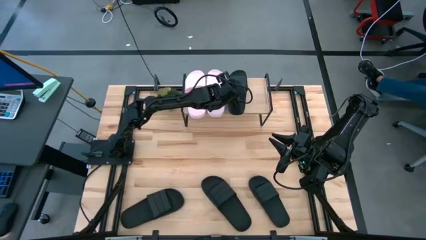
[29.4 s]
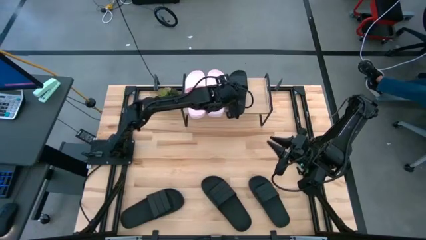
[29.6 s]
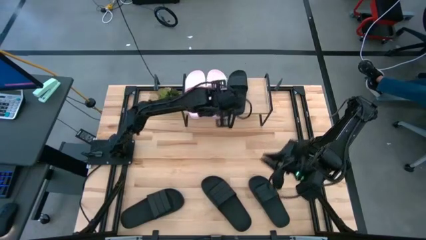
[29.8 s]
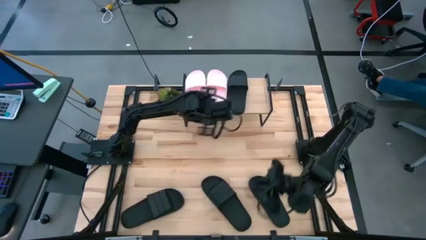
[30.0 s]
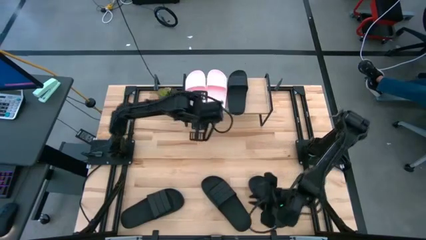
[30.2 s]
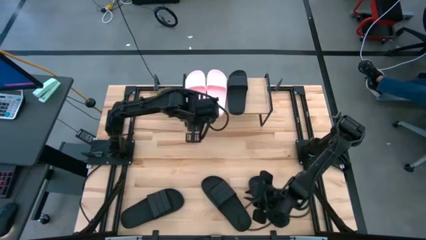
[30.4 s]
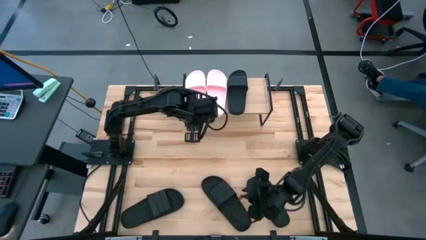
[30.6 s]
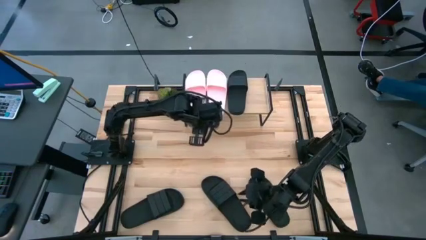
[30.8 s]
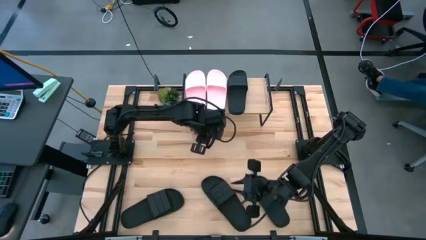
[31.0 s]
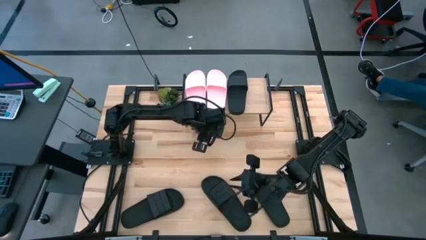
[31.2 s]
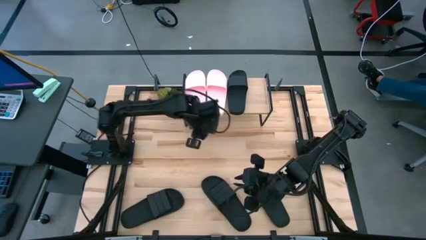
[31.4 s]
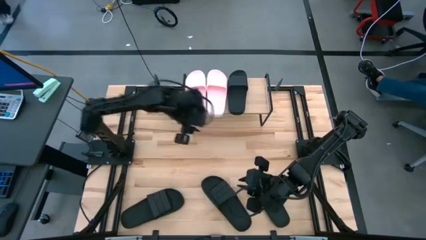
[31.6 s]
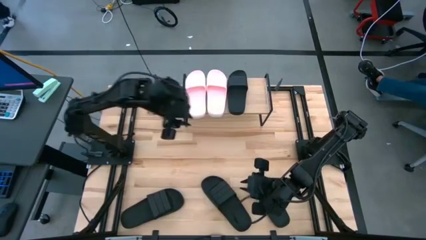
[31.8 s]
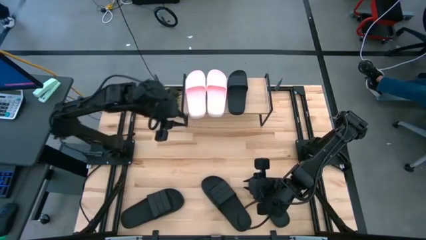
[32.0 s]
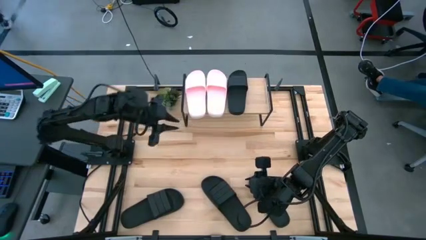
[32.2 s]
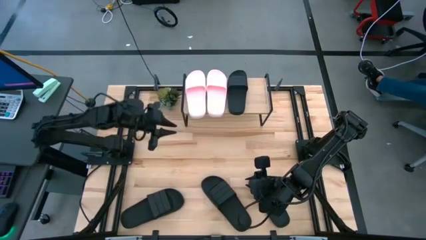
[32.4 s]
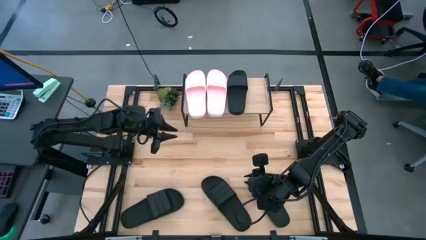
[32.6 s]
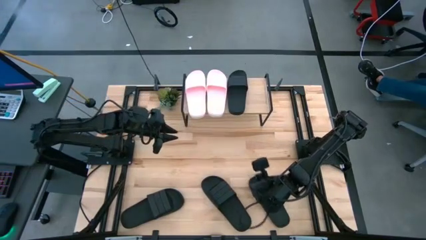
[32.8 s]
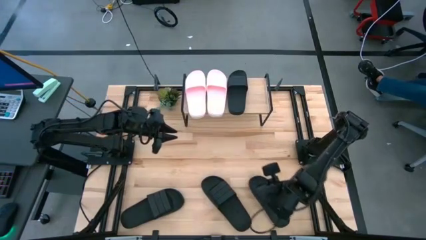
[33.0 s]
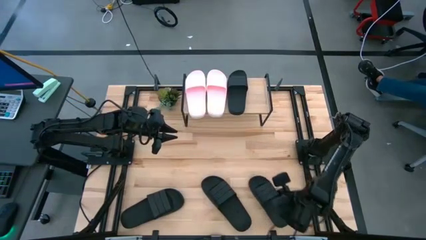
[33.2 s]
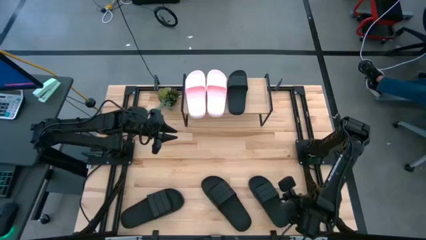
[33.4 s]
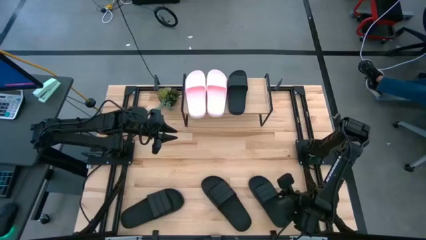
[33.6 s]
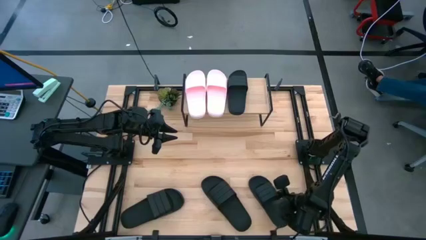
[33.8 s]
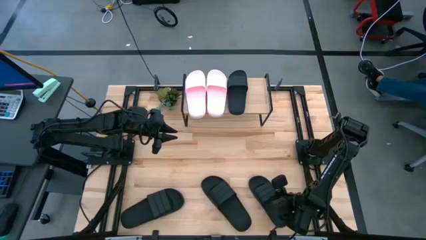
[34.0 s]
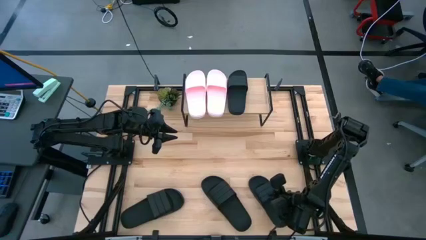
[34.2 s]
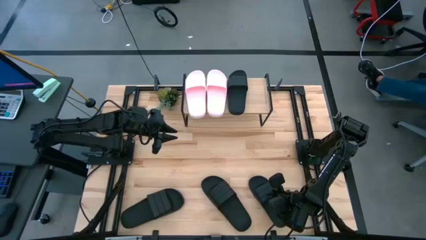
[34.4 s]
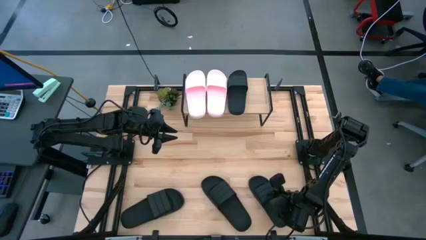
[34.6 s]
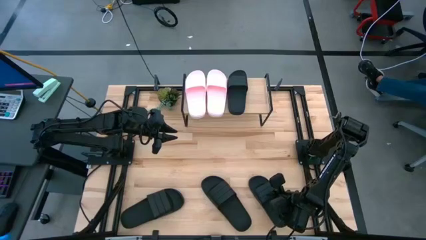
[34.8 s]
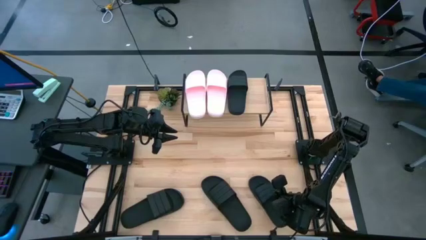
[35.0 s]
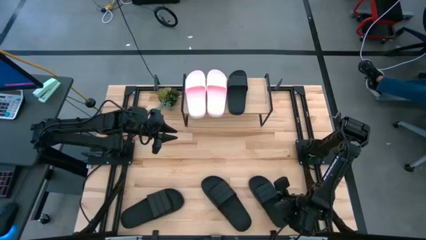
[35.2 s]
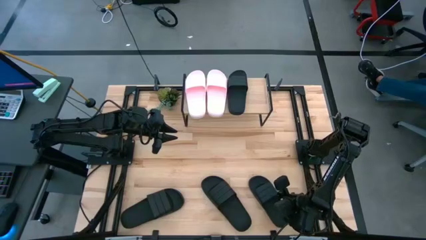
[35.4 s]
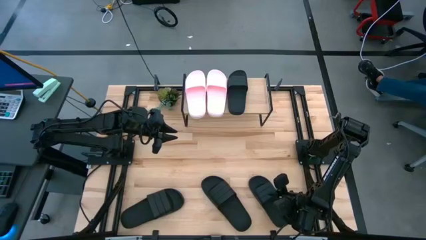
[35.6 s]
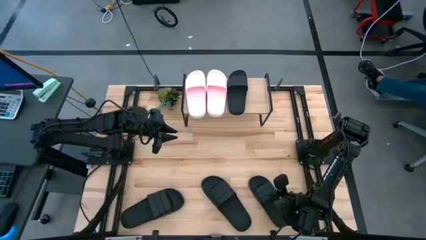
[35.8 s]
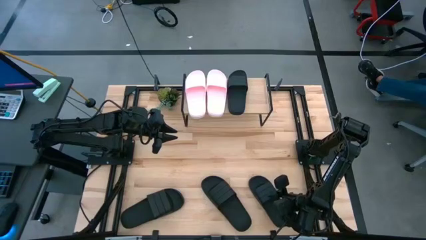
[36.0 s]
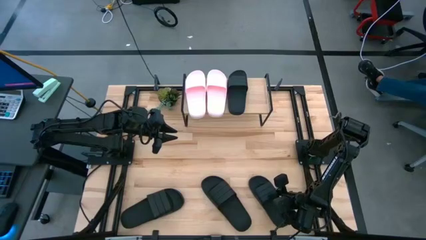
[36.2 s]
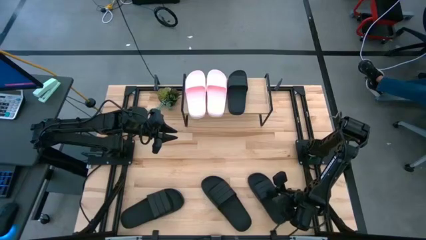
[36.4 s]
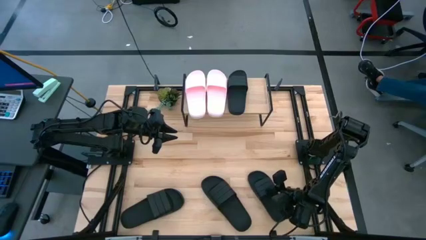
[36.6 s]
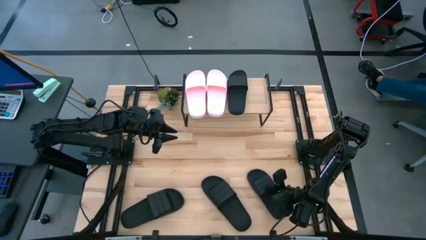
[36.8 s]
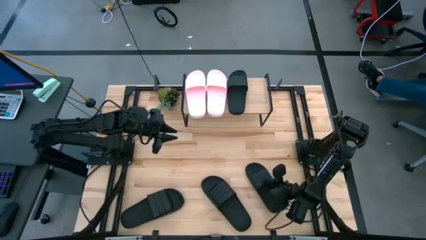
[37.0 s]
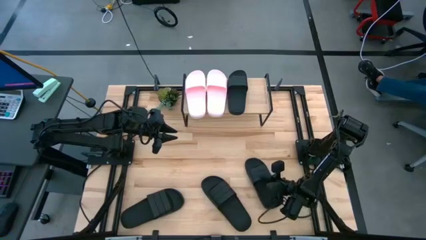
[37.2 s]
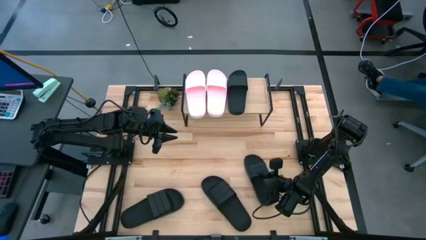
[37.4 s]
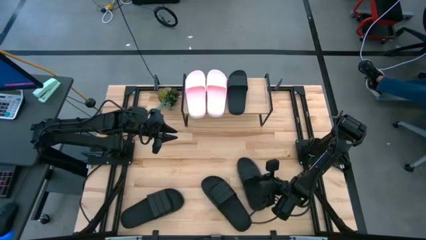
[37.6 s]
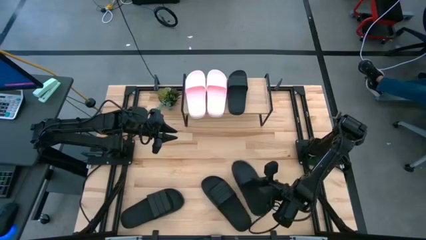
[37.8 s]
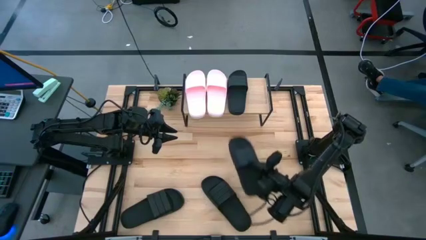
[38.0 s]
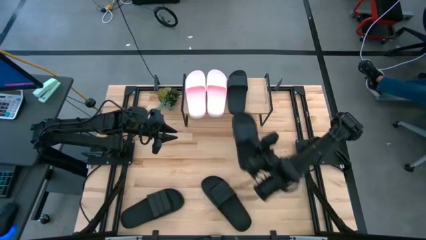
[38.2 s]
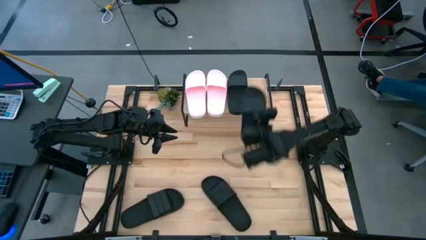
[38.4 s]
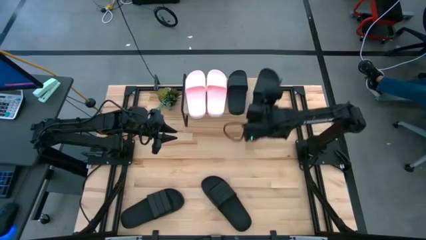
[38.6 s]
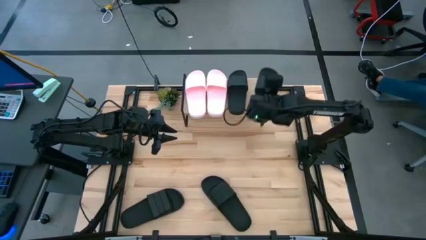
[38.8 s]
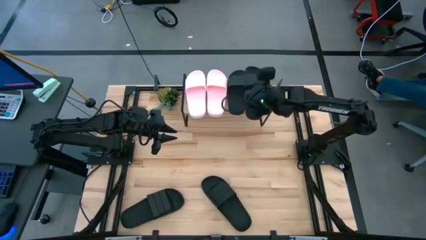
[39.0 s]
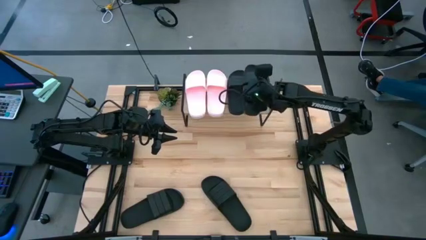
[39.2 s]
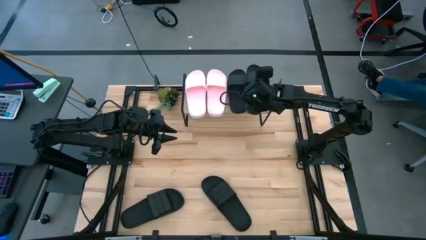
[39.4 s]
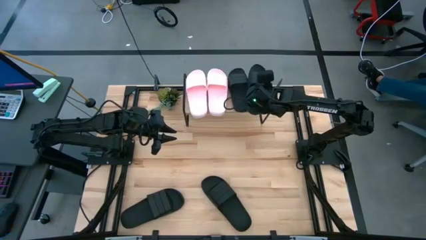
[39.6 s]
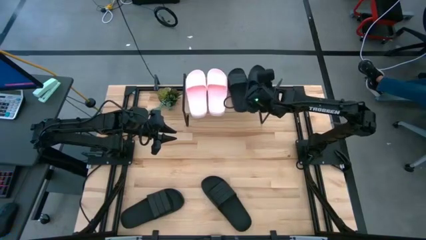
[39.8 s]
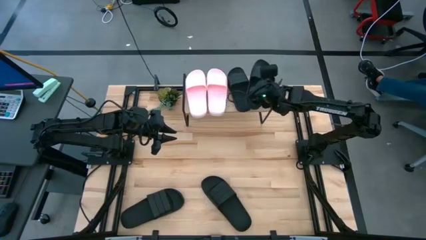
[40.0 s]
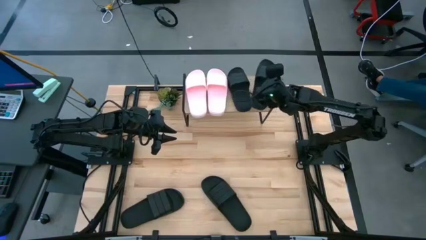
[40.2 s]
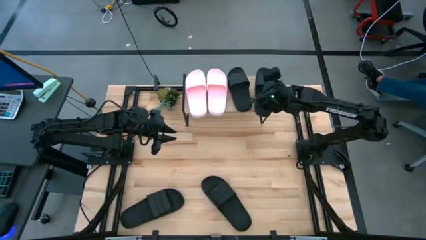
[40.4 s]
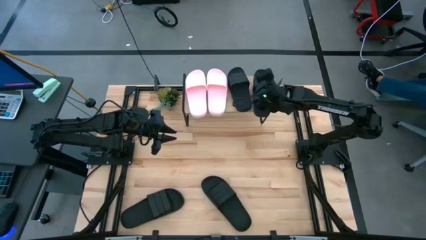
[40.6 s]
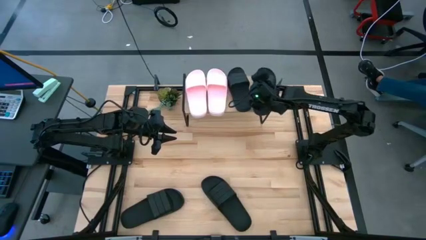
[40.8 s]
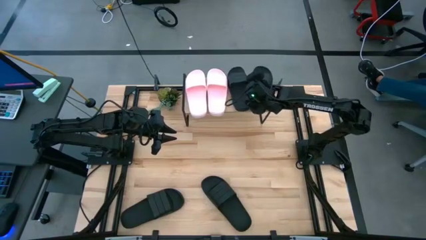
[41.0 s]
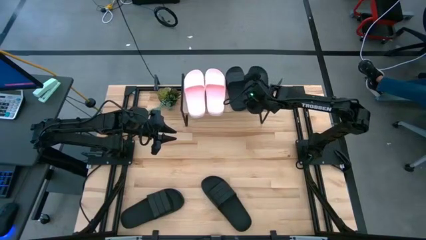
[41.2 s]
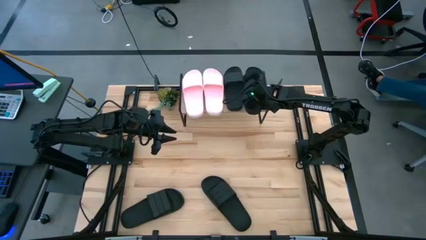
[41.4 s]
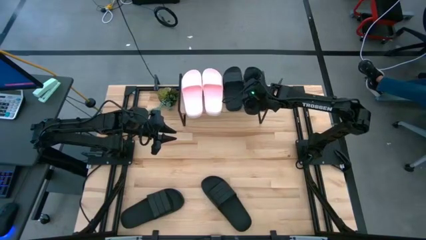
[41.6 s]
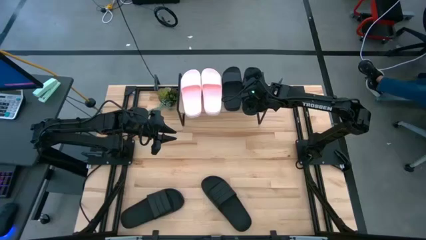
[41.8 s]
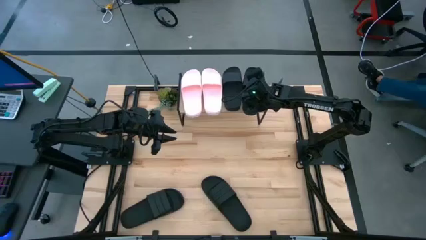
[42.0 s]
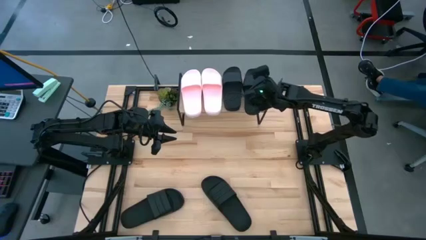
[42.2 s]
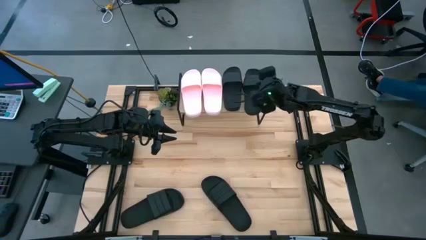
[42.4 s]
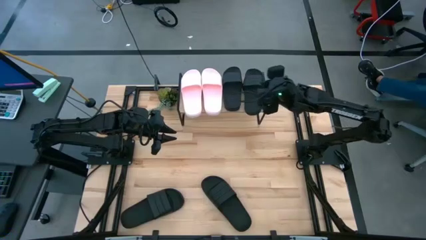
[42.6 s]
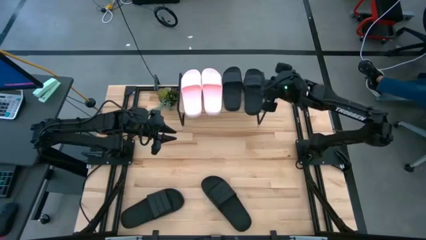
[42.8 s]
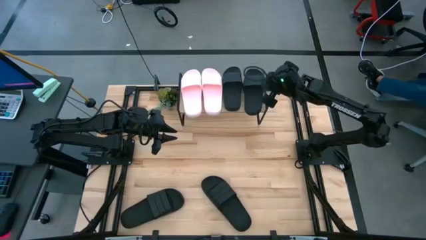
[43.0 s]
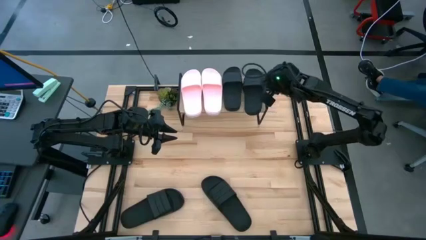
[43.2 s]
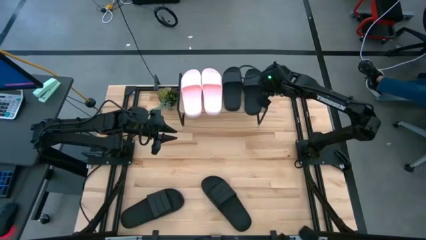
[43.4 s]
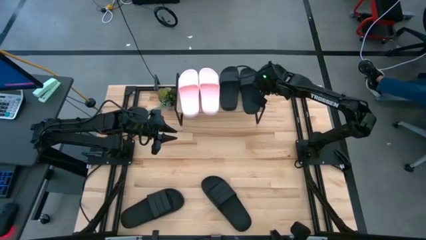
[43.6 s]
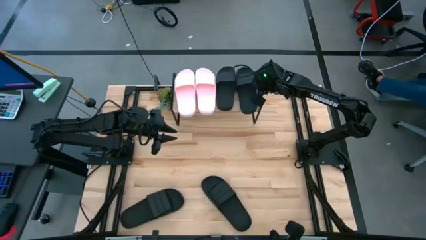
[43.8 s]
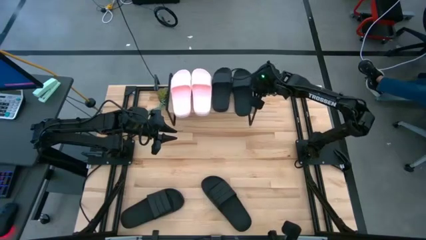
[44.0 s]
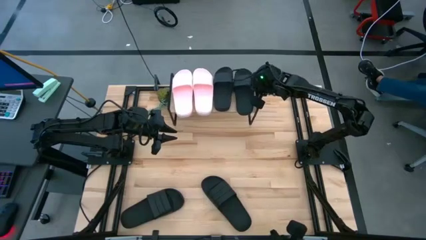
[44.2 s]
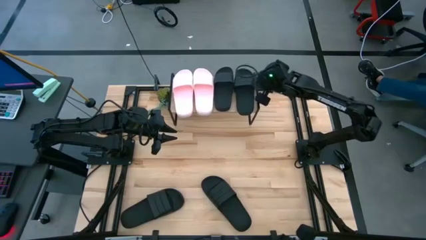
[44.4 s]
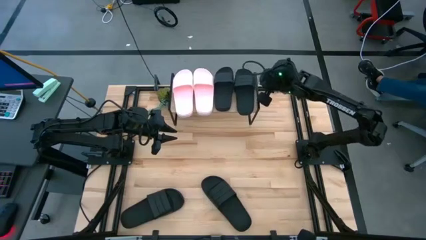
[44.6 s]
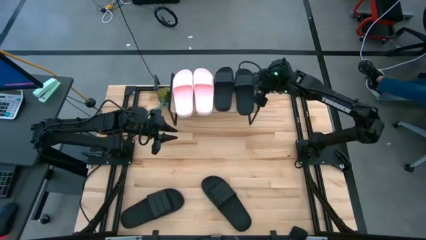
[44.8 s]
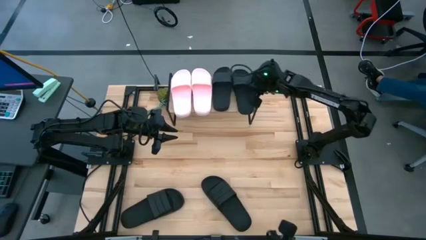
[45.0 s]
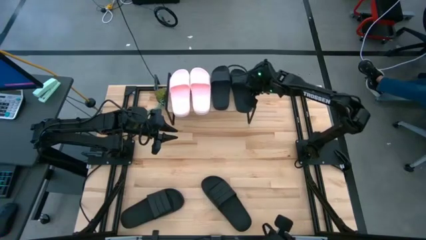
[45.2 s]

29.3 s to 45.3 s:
Task: Pick and place slides into the shelf
Put the right black slide on the shelf
